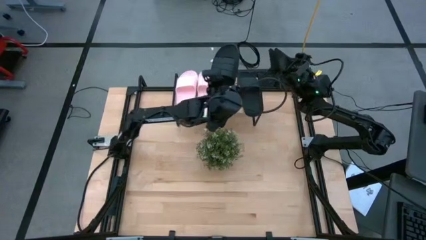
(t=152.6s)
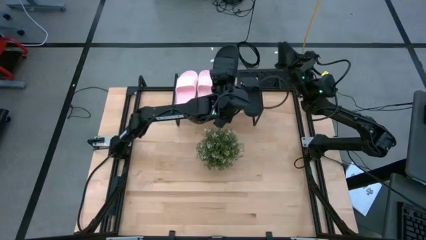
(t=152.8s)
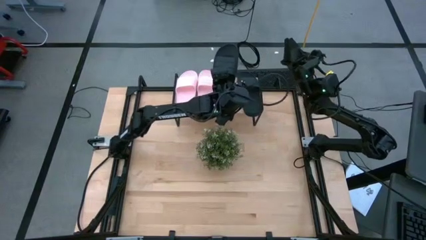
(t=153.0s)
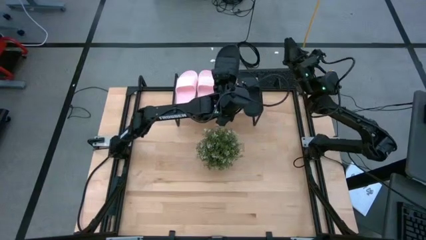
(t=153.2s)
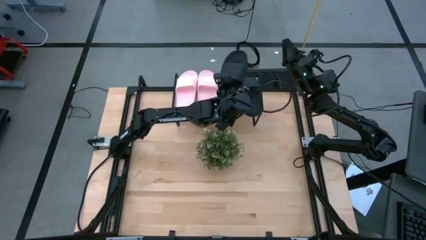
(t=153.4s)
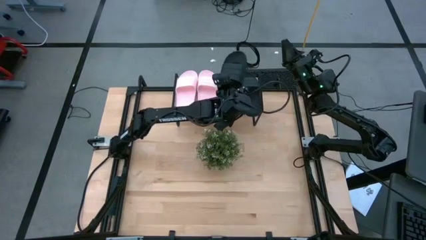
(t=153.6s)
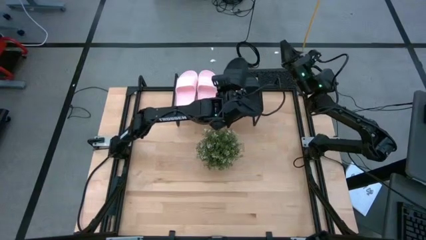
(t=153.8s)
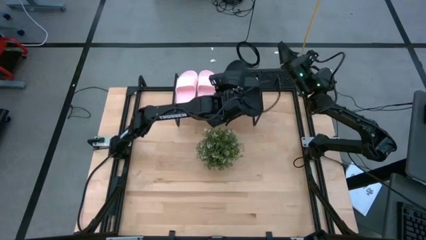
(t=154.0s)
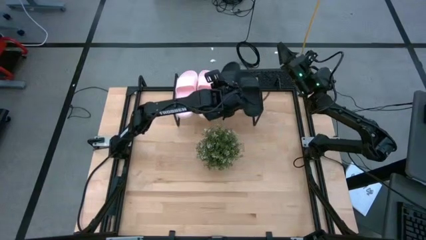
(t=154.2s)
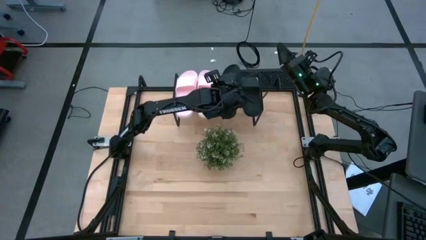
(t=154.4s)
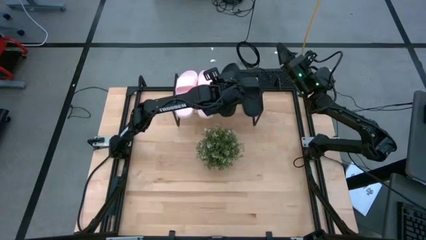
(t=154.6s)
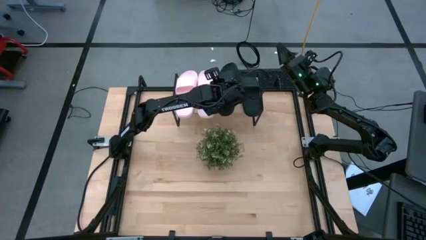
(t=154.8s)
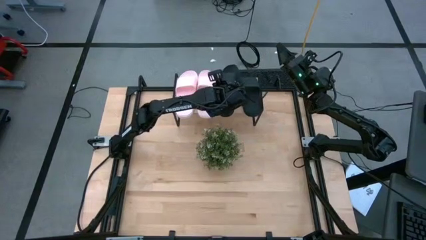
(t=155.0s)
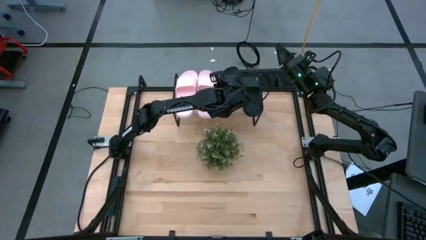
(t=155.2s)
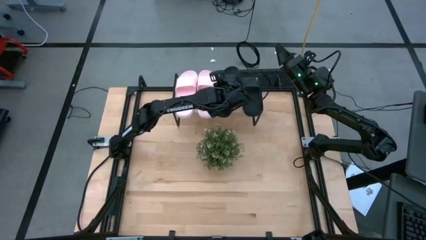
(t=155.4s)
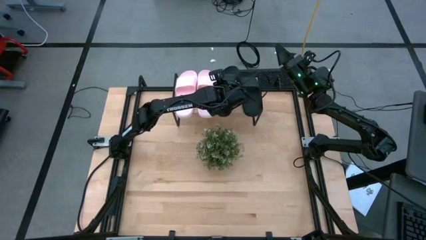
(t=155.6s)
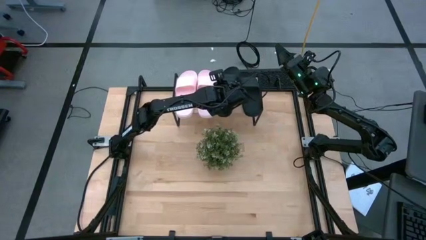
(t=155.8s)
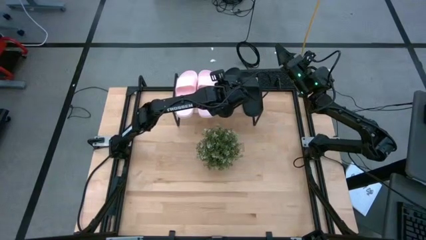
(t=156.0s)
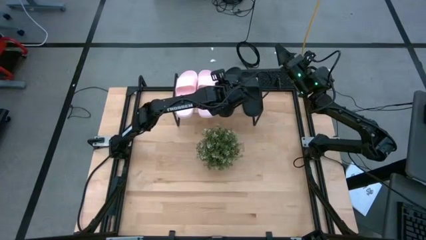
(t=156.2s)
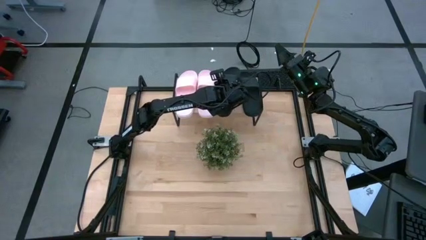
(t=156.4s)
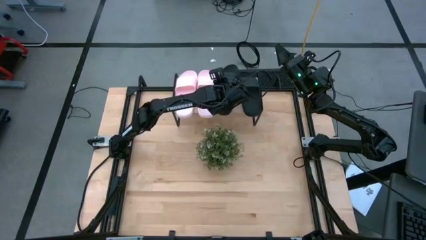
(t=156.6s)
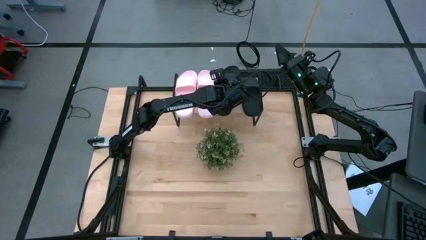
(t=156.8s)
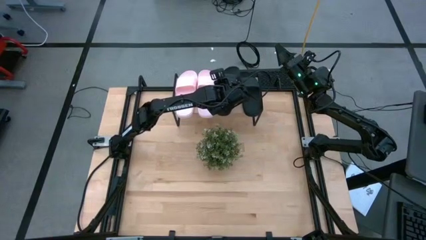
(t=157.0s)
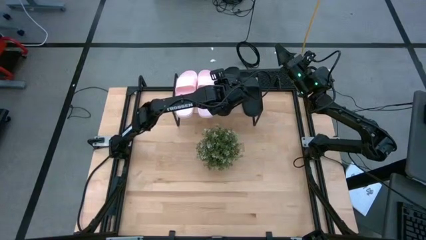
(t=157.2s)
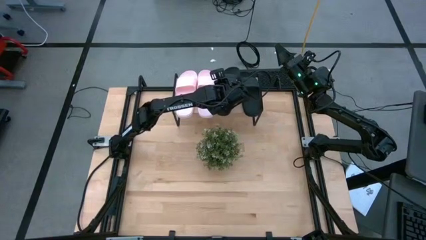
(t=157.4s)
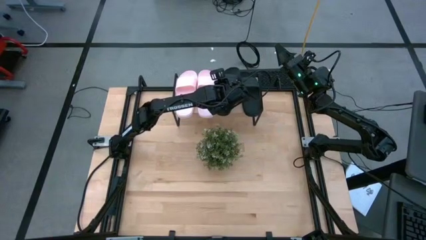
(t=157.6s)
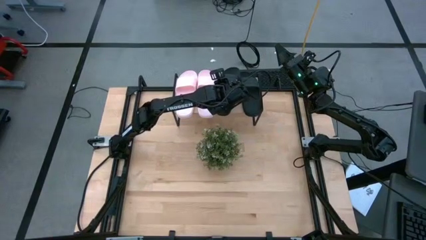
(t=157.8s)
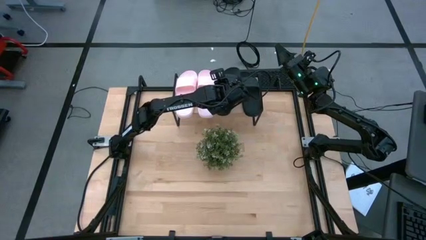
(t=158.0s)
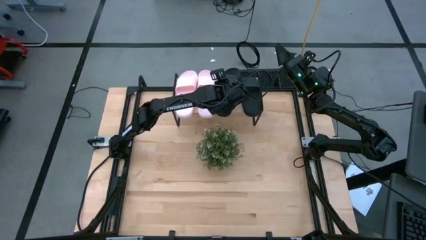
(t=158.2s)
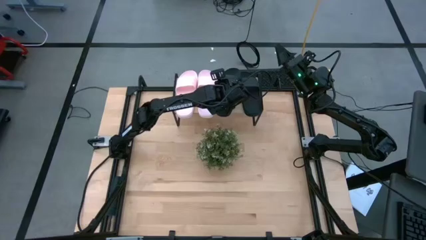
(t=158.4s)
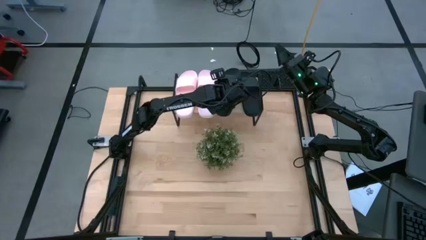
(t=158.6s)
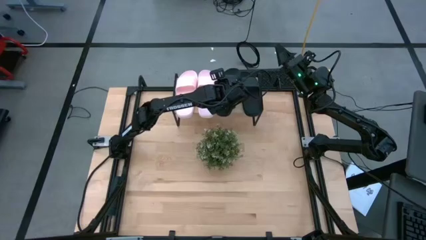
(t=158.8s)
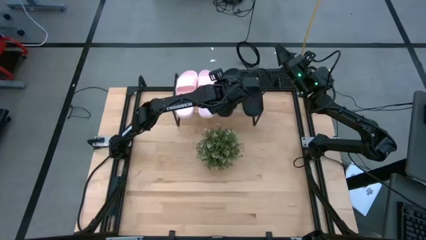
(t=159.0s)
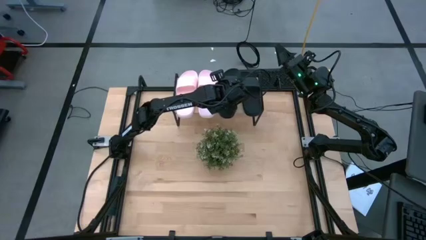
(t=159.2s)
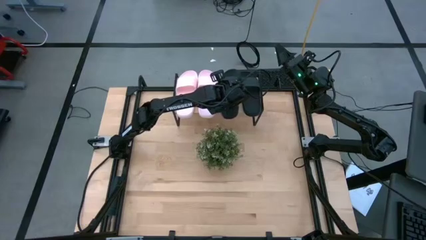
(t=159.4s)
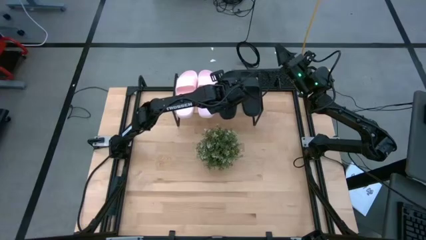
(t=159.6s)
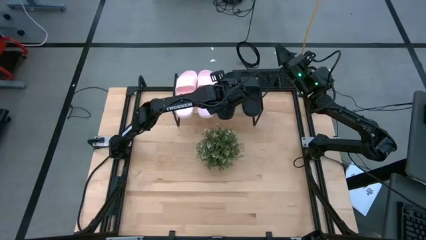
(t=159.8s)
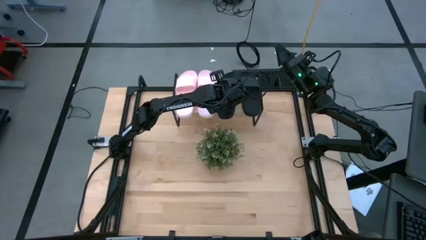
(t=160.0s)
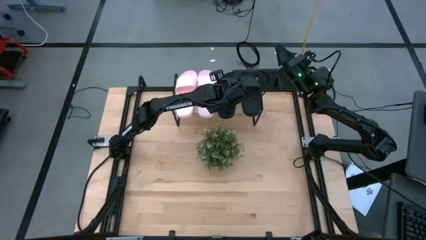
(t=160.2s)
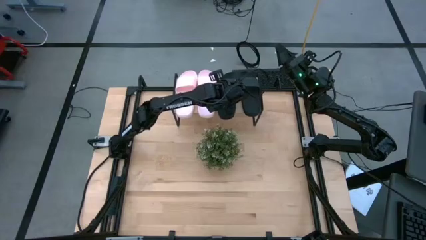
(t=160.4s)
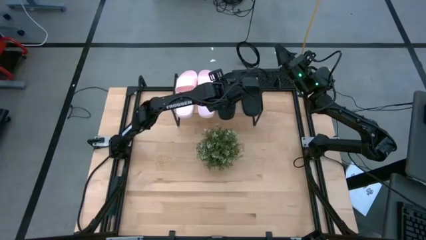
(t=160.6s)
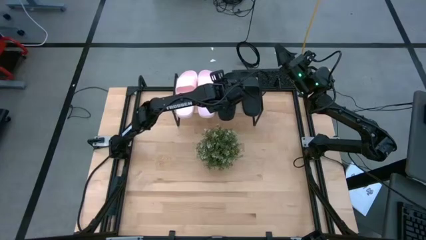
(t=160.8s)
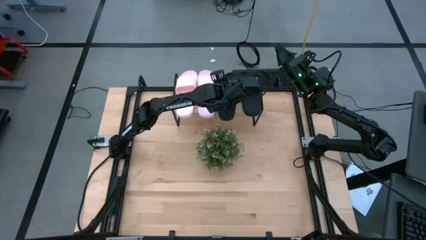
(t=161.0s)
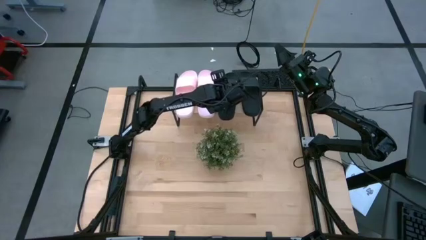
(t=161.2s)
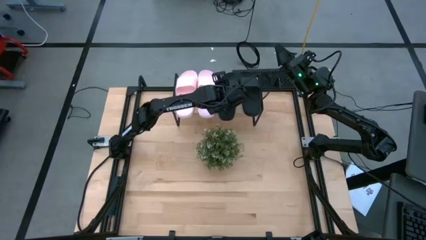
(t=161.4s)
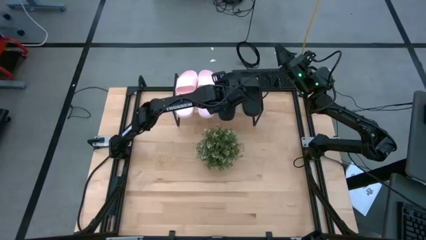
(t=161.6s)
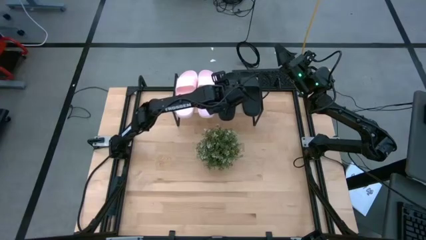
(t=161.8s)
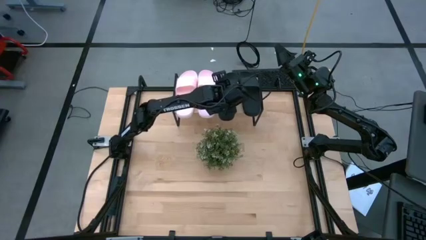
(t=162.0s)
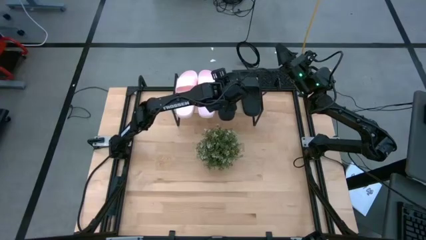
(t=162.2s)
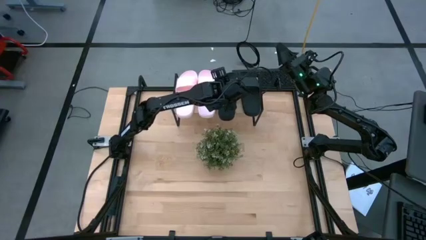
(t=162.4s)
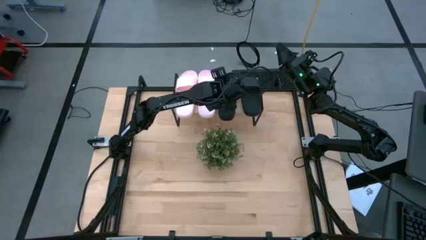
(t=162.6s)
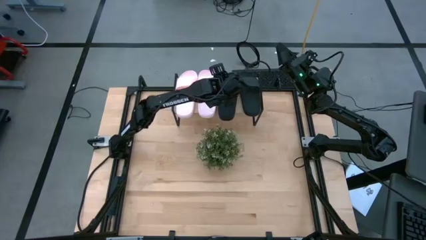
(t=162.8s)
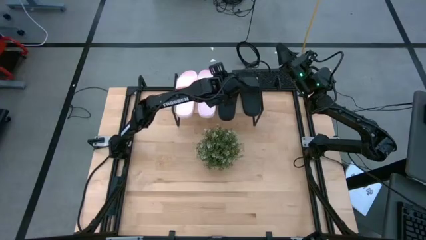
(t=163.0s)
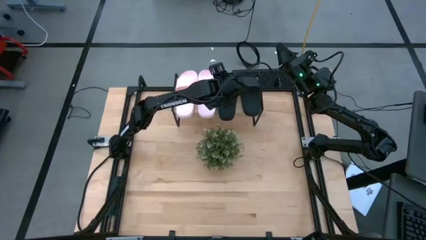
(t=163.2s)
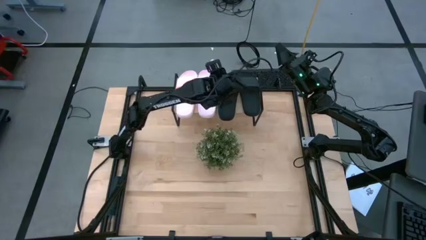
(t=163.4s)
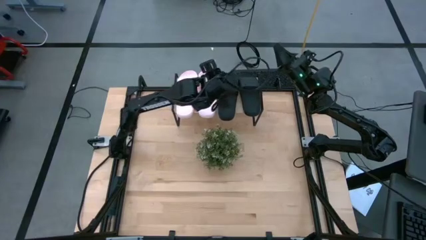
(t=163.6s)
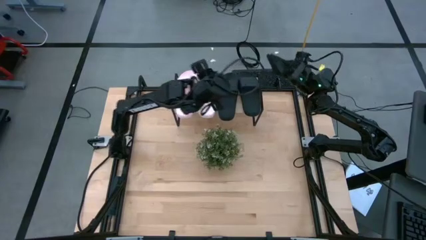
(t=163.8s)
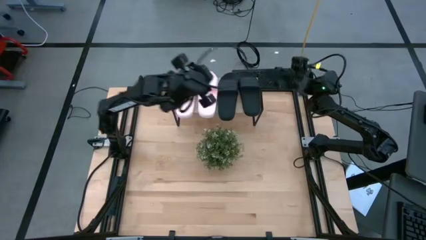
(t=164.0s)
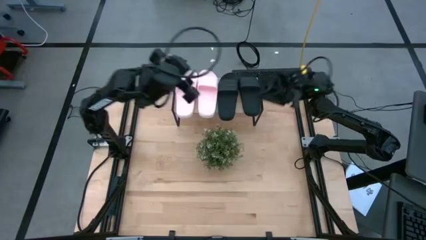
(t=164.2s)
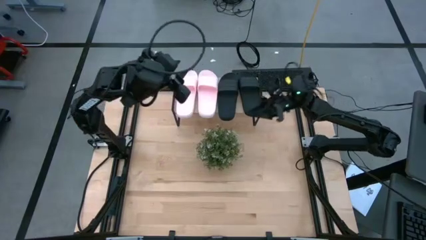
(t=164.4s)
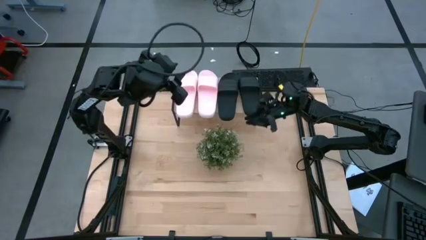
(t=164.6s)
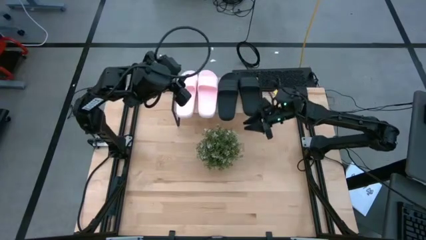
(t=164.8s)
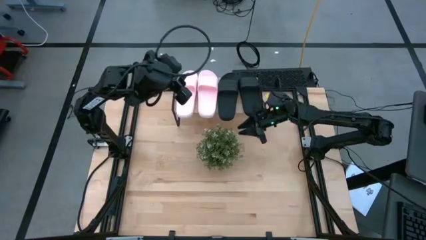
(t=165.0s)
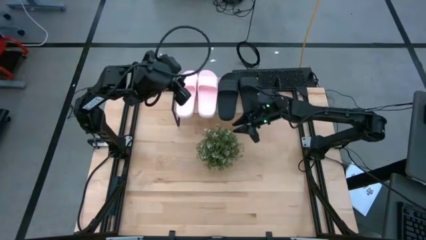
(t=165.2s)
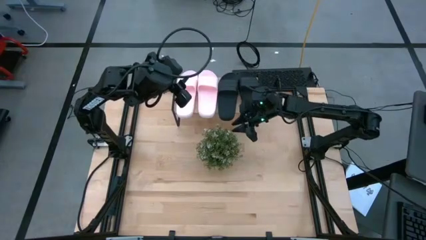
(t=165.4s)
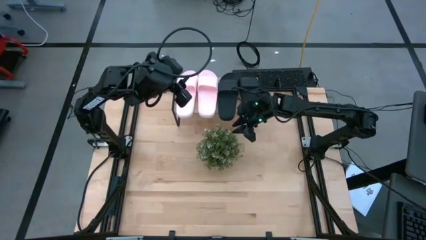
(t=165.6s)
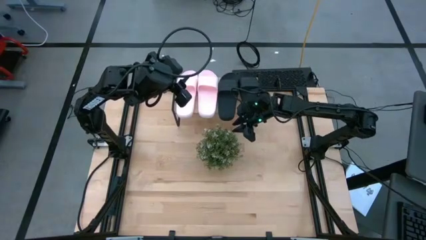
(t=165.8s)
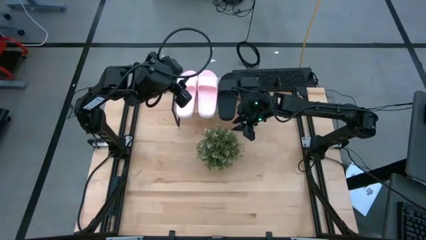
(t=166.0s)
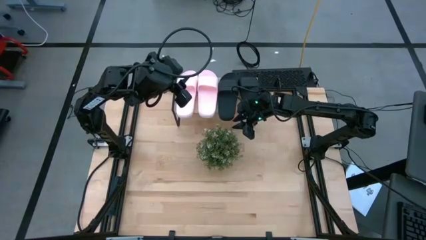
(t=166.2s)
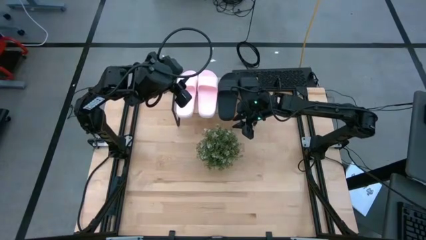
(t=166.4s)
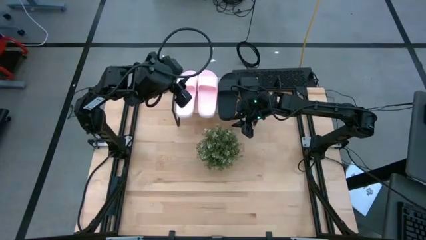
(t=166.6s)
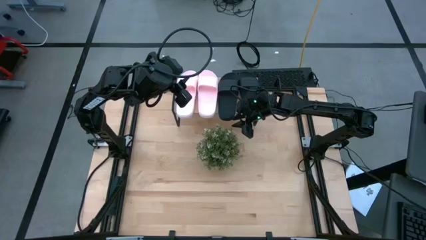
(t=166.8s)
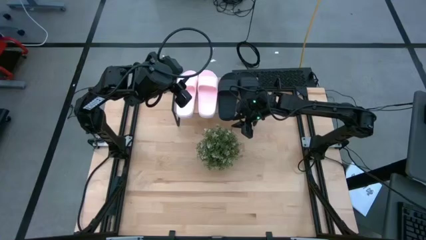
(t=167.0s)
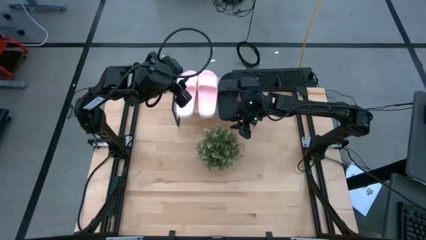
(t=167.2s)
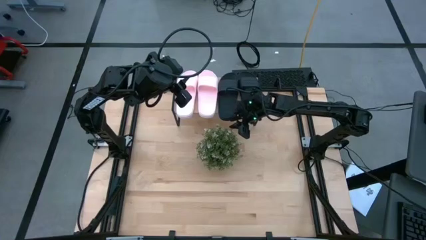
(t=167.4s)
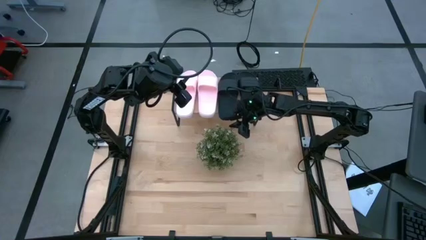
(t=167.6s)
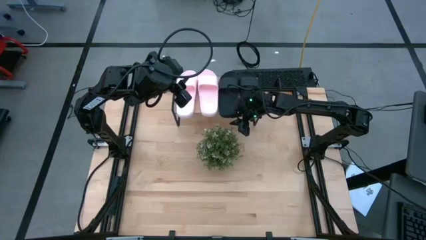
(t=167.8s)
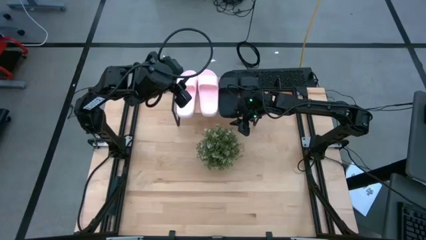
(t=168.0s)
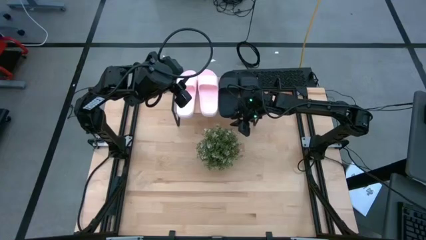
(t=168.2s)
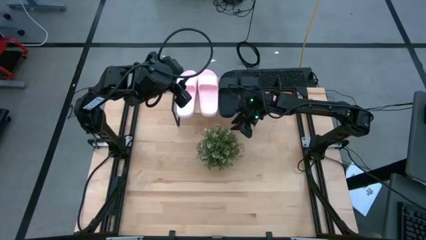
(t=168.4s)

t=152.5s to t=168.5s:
Task: Pick and place slides into the shelf
Put the black slipper on the shelf
